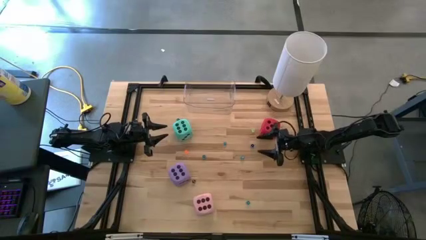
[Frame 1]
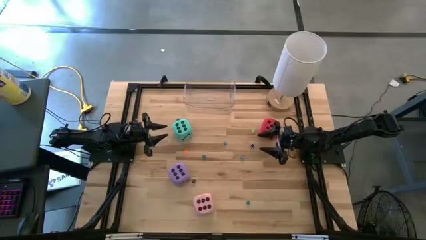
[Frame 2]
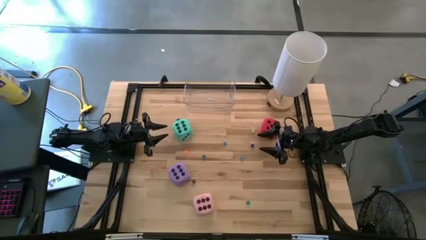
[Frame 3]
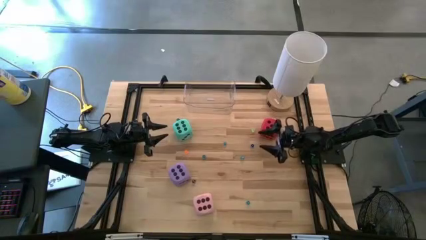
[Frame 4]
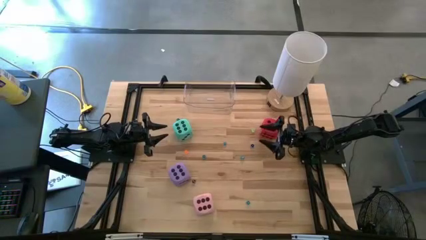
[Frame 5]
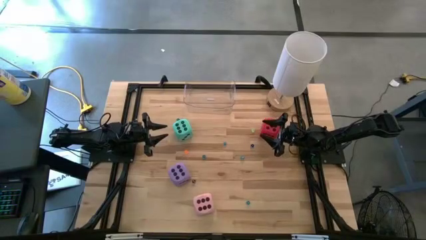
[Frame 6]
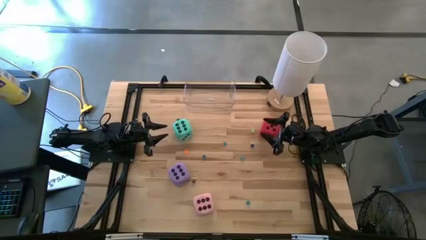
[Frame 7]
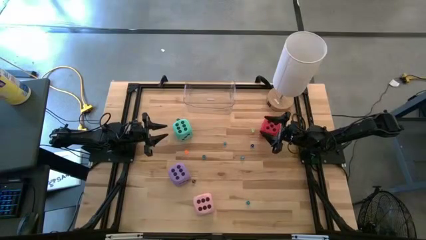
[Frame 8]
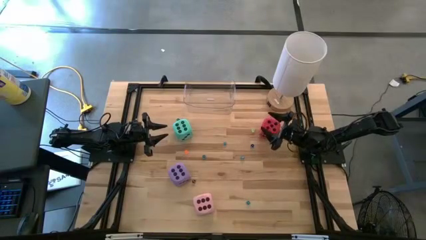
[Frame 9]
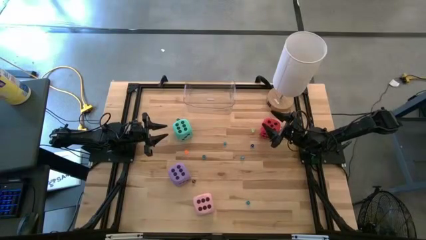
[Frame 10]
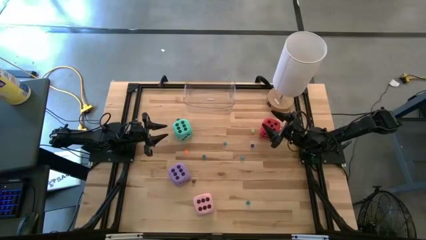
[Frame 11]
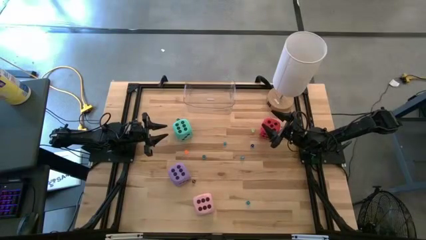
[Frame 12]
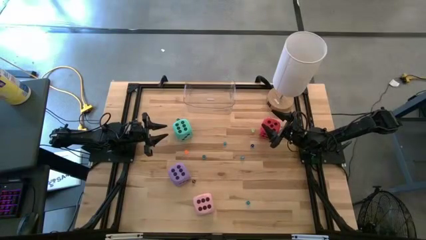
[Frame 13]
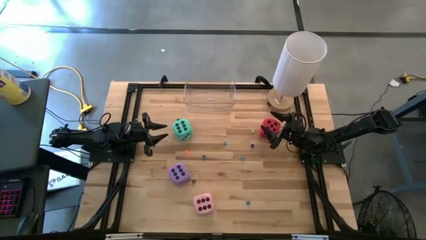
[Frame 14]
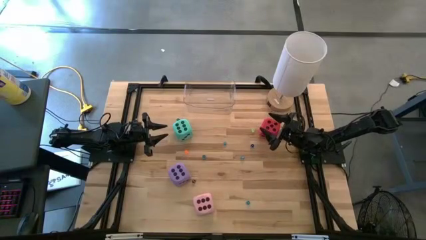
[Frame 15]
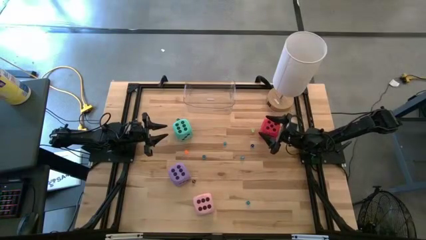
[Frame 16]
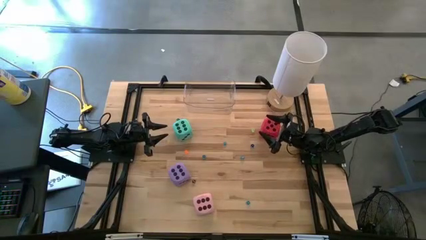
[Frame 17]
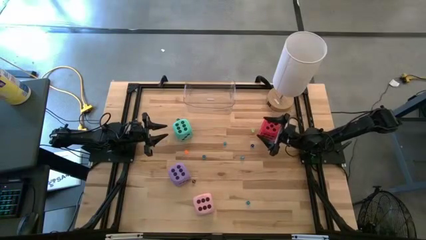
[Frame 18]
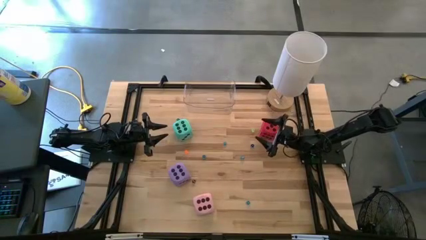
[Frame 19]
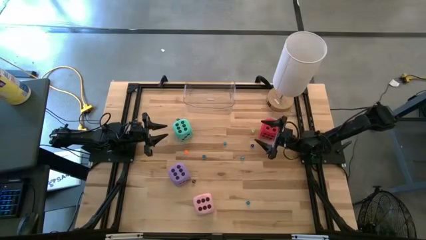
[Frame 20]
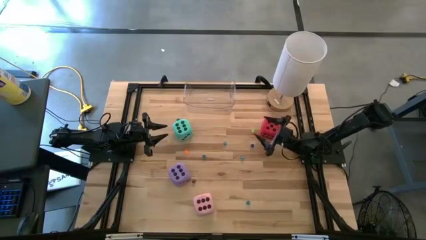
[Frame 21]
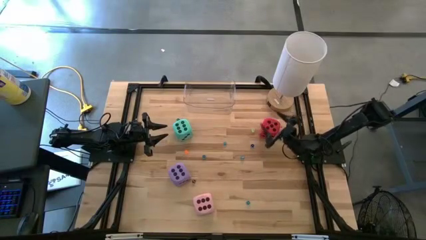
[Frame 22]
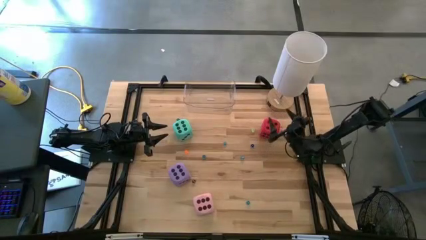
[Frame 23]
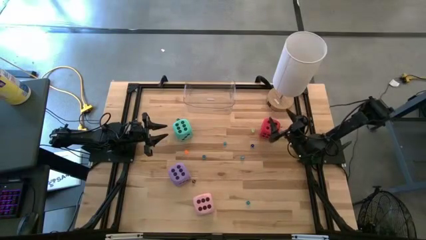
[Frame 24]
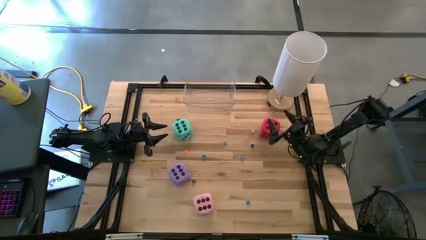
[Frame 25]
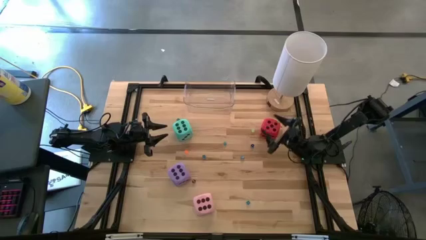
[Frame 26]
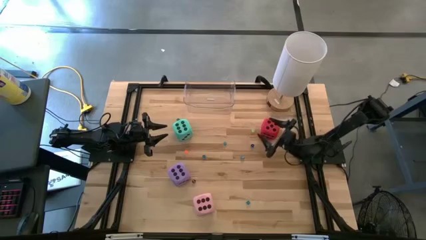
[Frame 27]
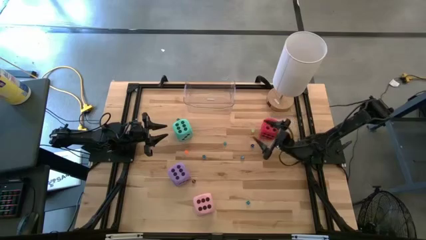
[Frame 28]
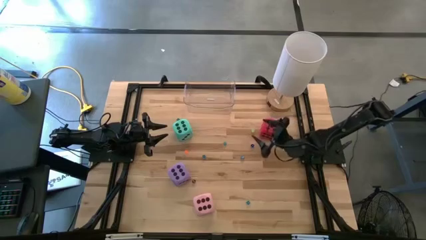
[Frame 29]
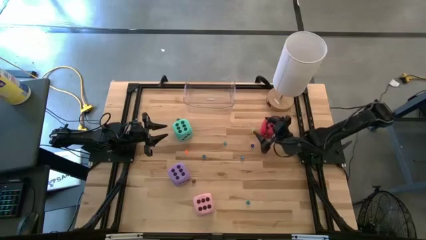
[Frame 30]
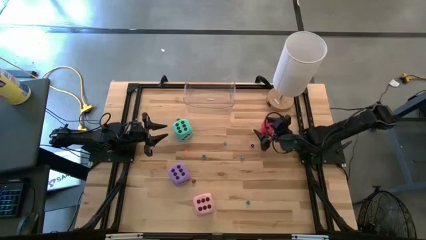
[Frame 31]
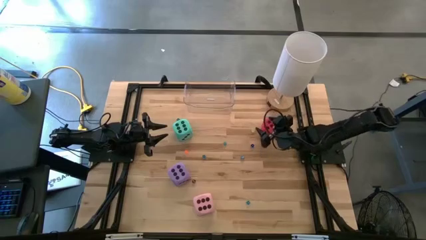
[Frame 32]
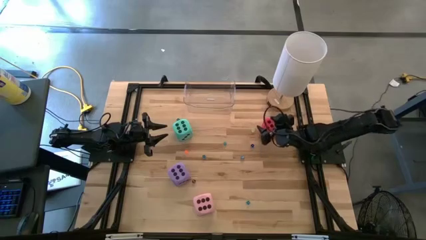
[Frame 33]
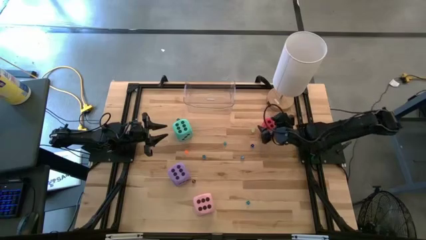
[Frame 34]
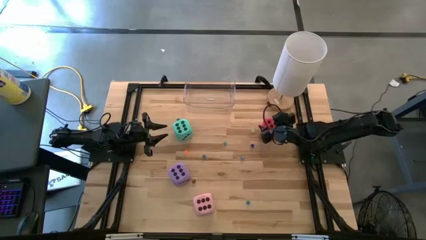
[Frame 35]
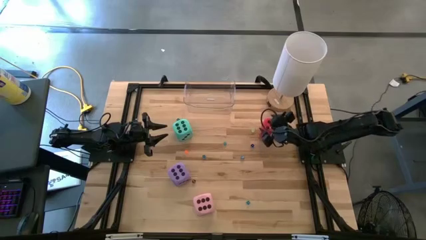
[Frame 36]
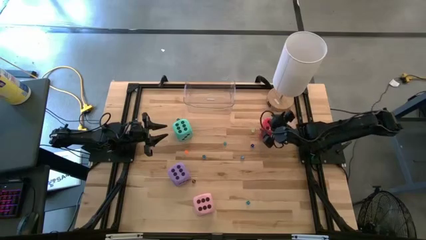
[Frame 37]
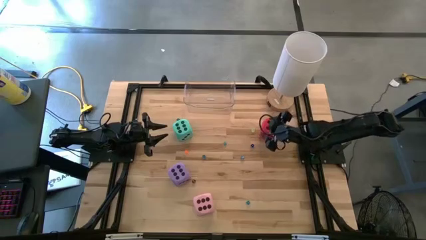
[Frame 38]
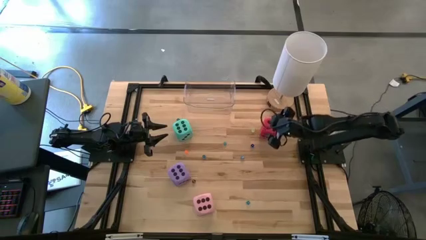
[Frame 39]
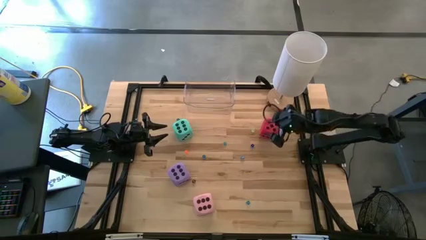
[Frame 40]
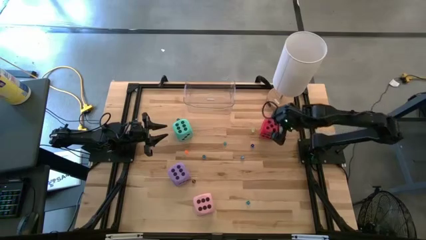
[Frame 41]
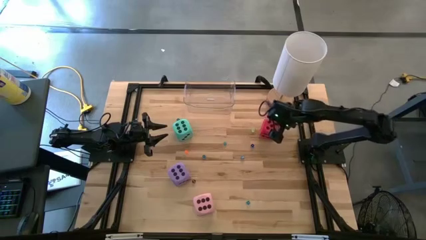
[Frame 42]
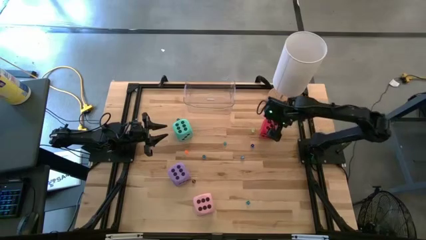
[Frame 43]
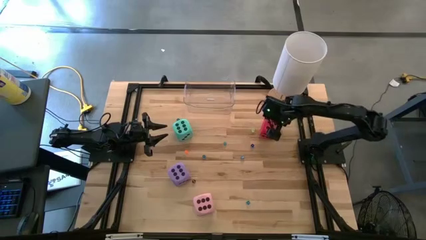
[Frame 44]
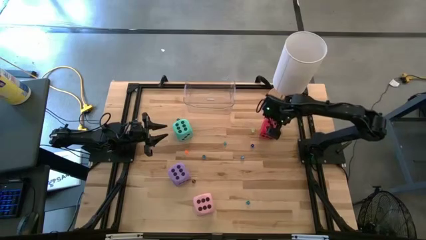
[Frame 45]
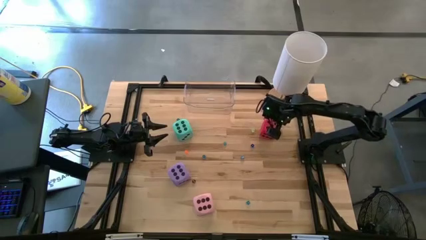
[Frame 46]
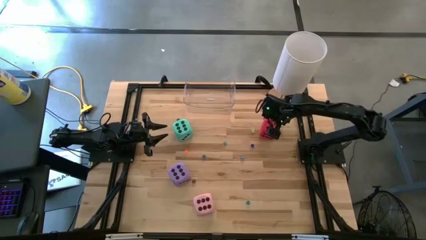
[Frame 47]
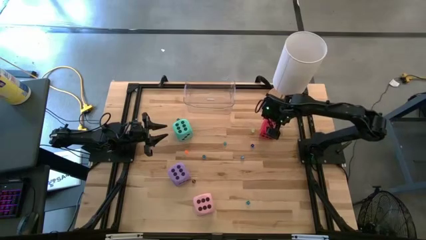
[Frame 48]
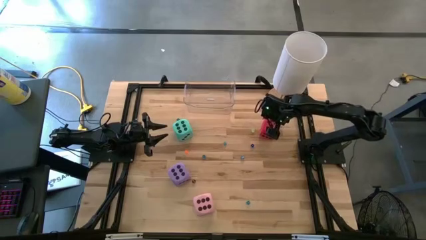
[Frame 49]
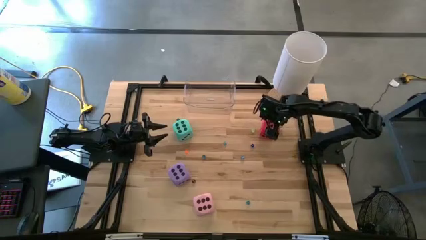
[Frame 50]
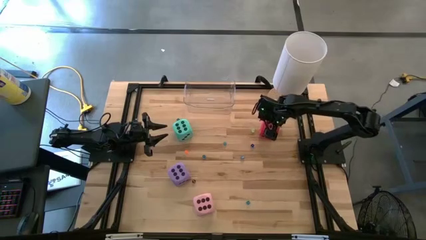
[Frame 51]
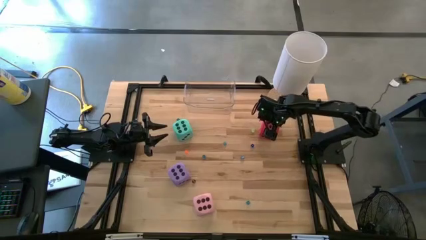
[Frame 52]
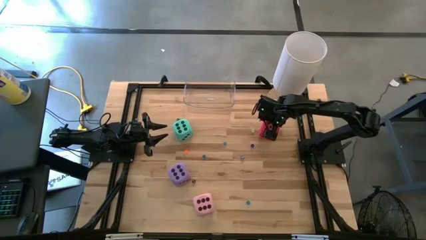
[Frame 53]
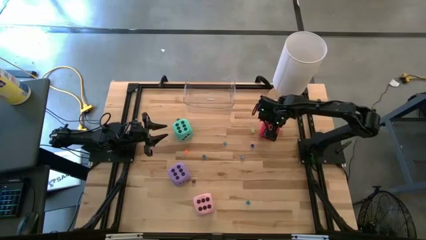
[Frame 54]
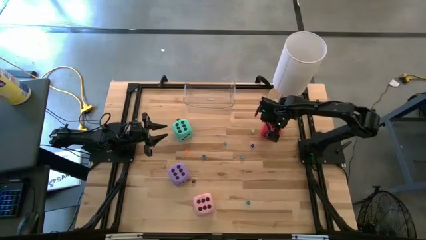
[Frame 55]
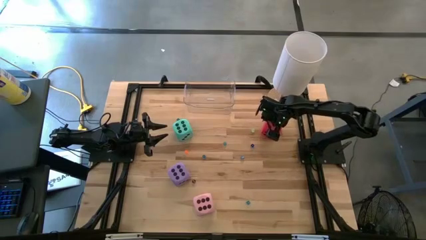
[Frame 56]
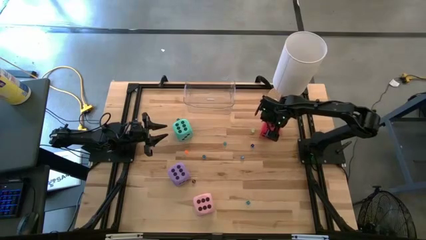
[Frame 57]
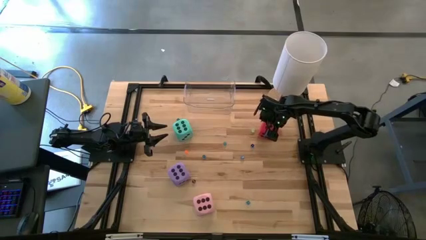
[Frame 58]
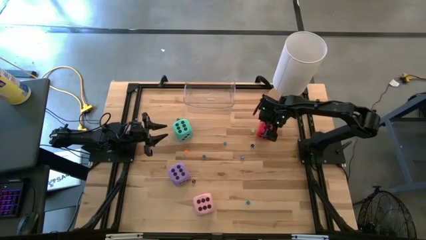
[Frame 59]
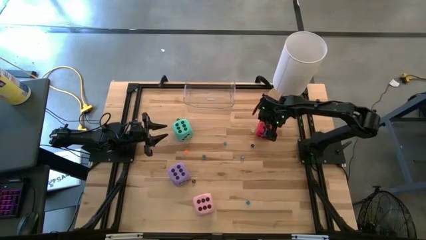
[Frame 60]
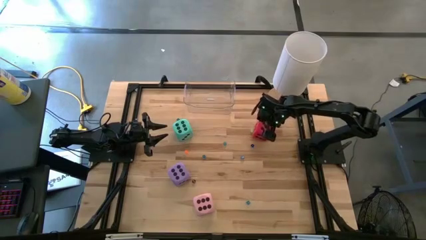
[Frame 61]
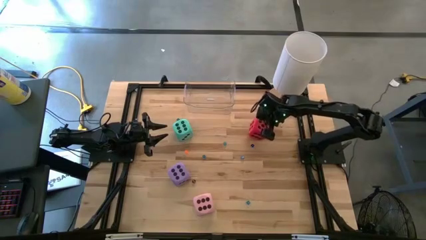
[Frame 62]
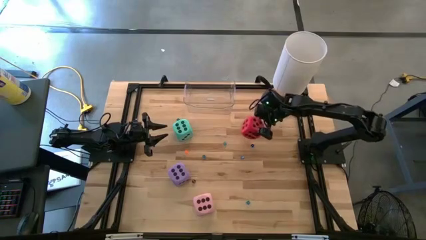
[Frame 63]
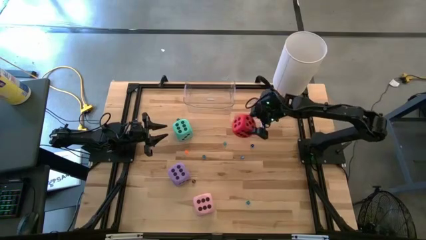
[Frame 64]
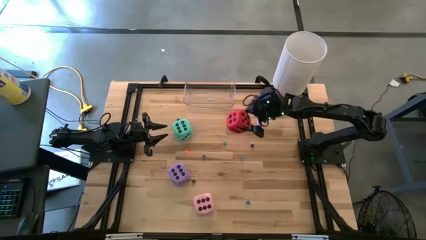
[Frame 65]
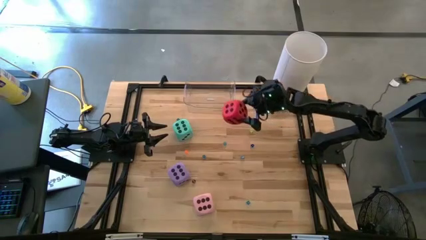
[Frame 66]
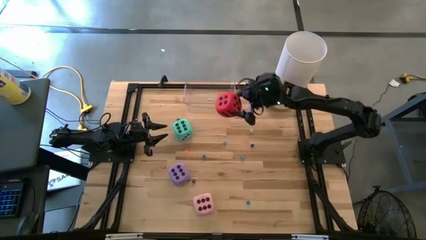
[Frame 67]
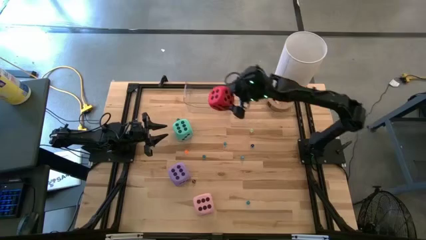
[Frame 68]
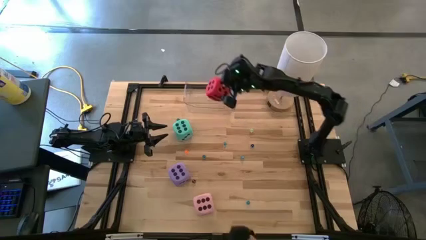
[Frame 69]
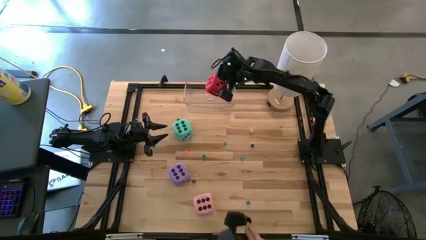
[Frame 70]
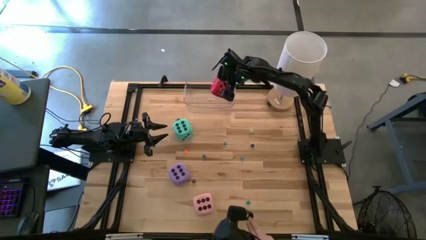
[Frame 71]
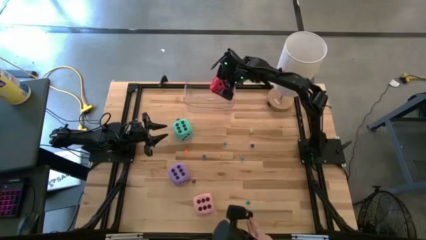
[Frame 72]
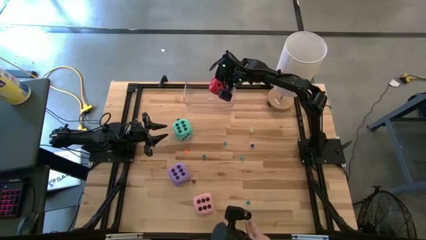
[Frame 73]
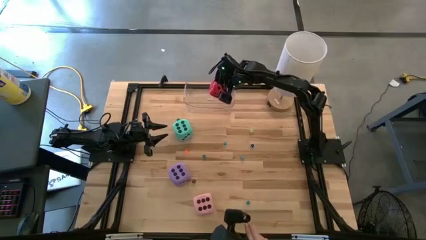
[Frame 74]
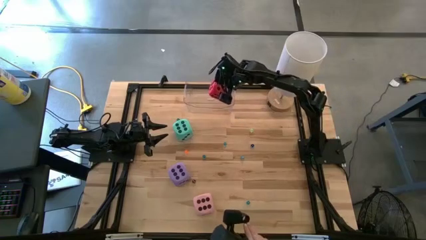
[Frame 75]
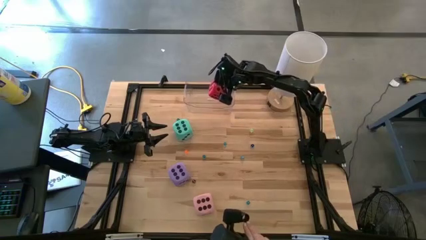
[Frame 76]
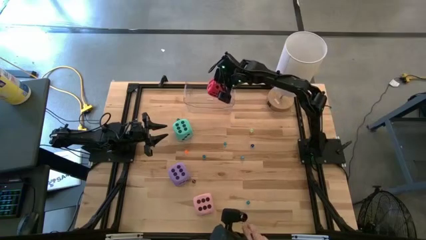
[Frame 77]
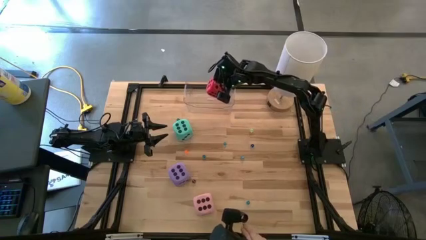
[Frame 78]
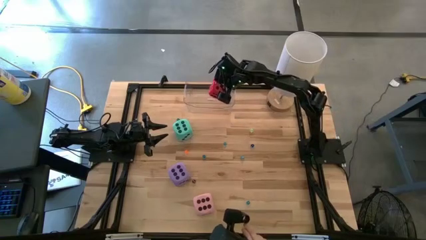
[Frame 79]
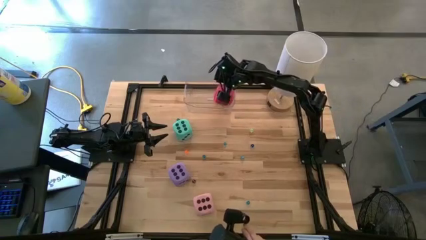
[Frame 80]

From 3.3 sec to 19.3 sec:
Task: Pick & Place Dice
Put the large red dice in the transparent bin
